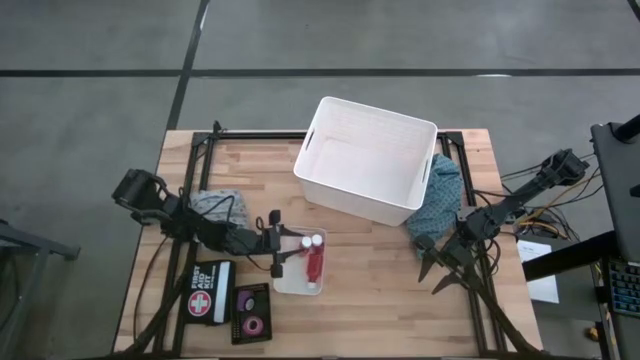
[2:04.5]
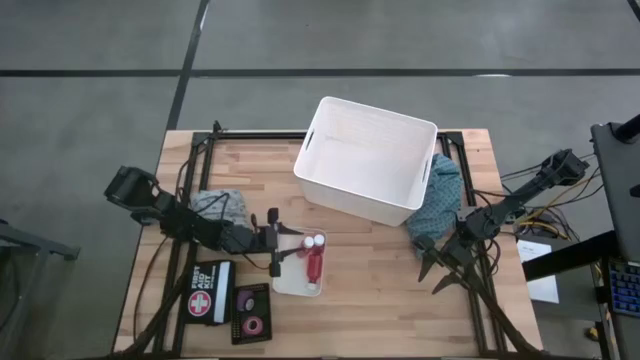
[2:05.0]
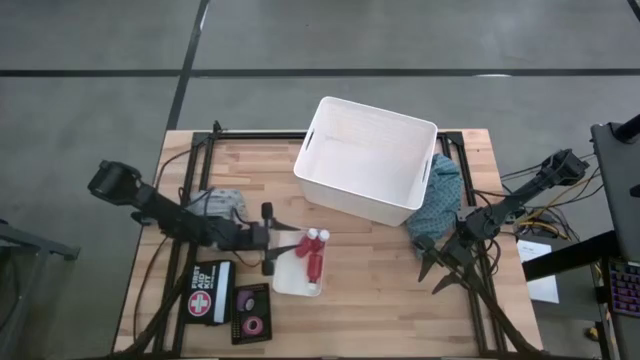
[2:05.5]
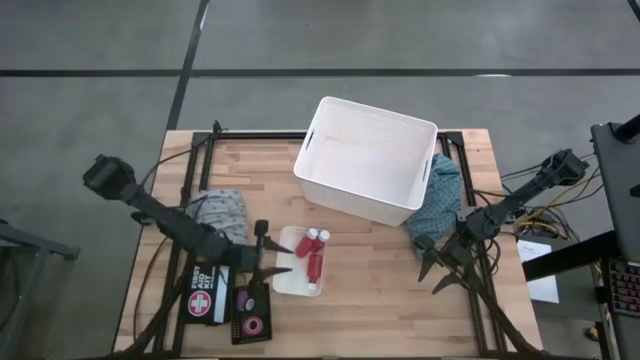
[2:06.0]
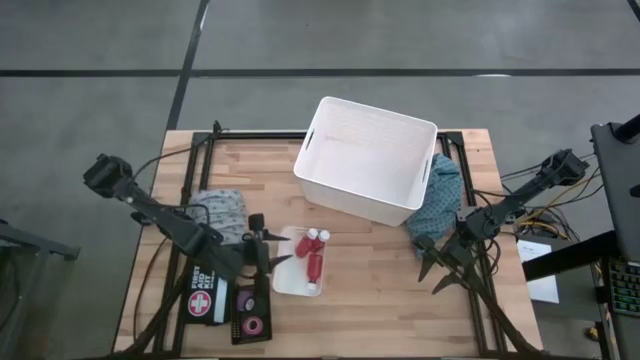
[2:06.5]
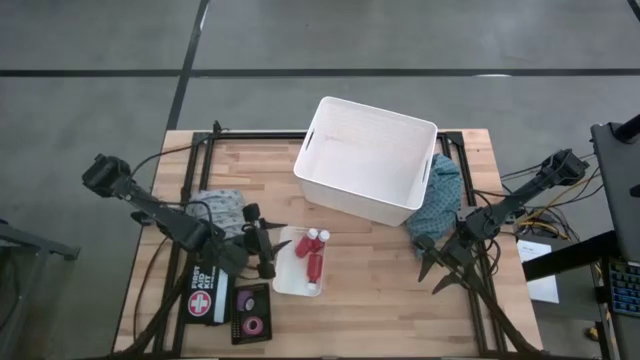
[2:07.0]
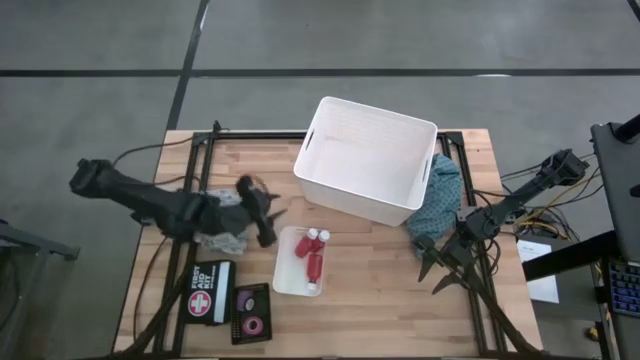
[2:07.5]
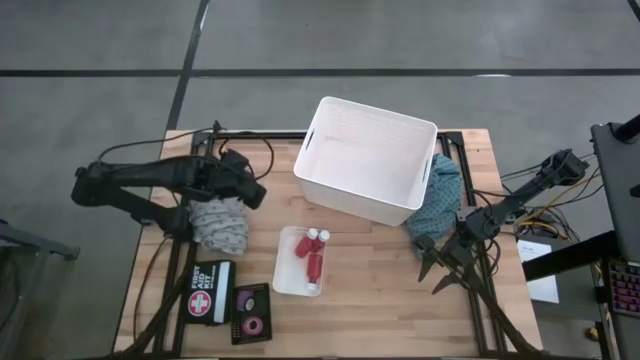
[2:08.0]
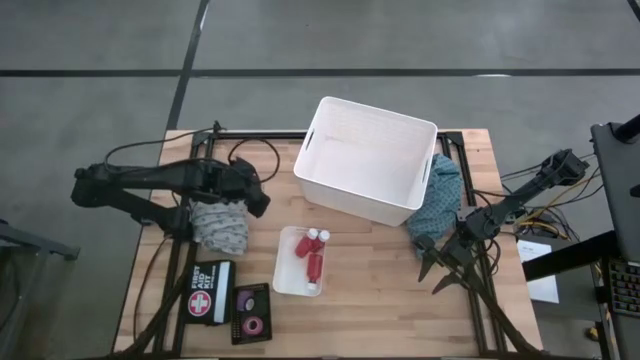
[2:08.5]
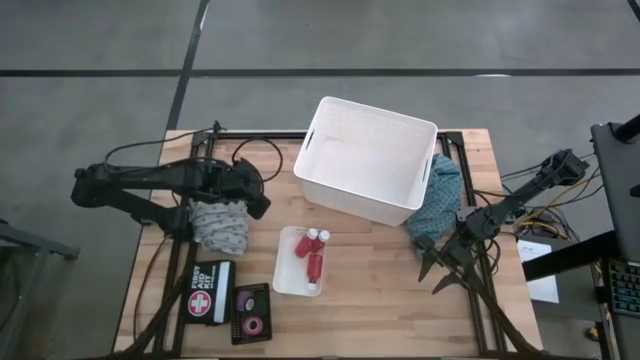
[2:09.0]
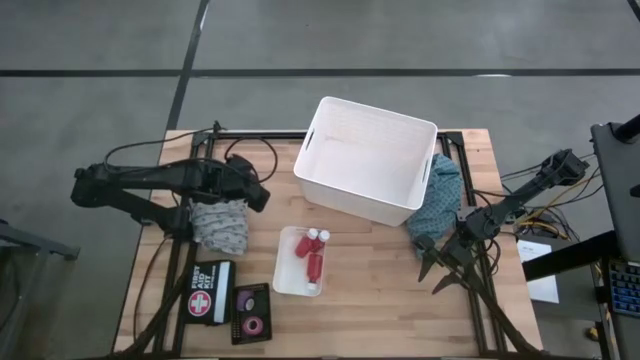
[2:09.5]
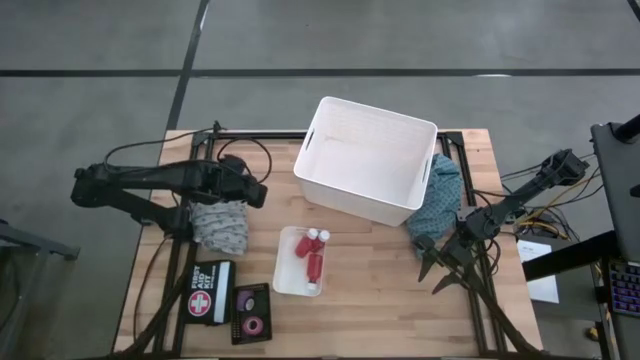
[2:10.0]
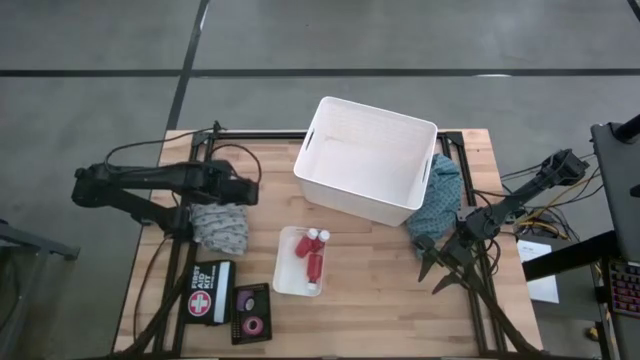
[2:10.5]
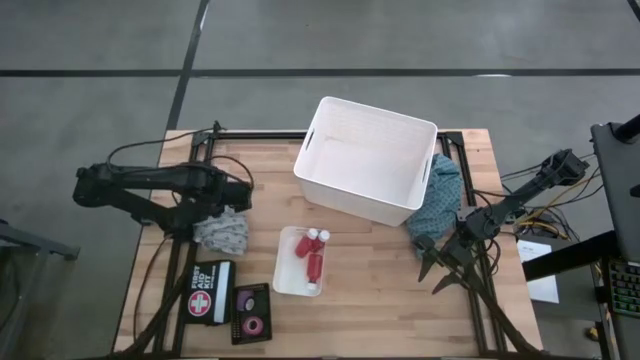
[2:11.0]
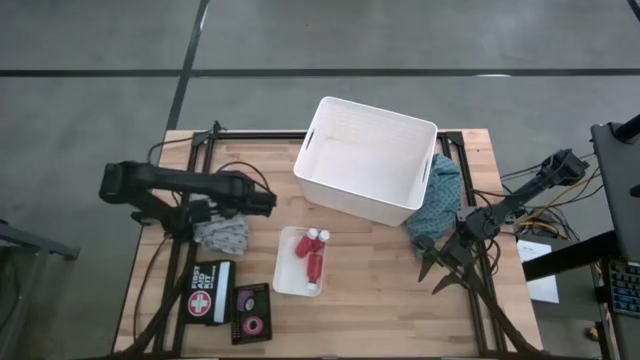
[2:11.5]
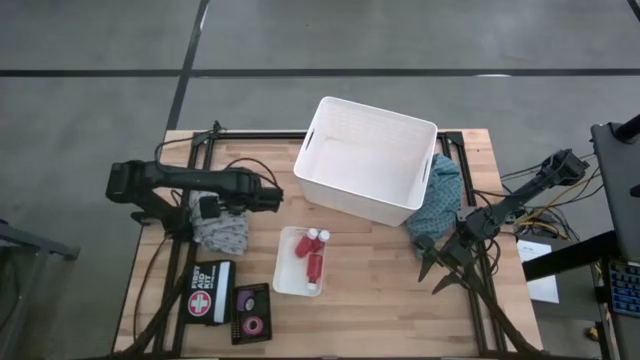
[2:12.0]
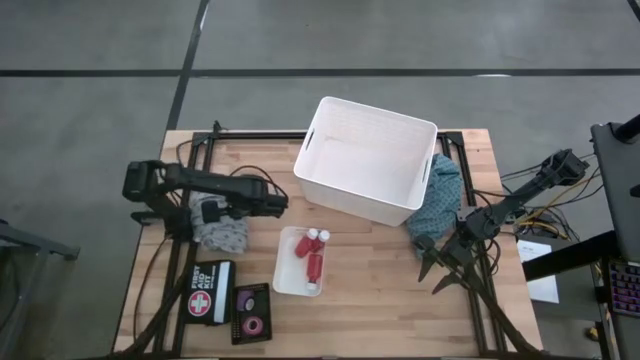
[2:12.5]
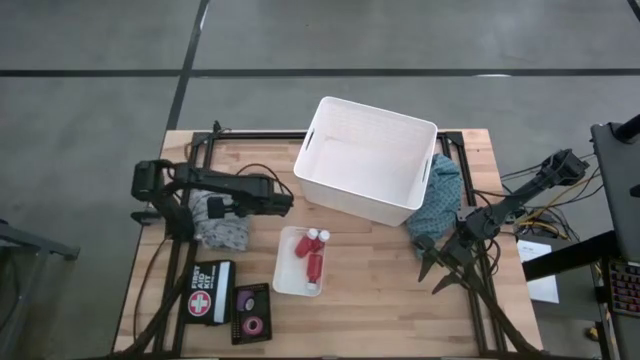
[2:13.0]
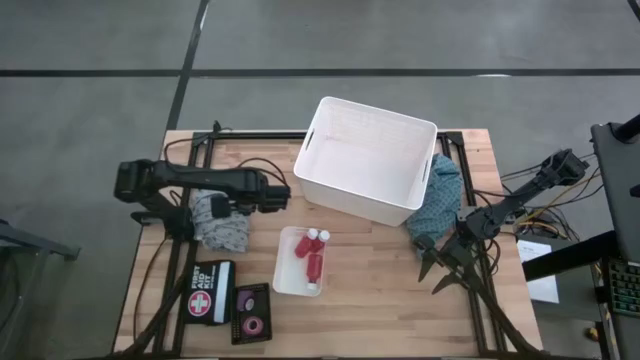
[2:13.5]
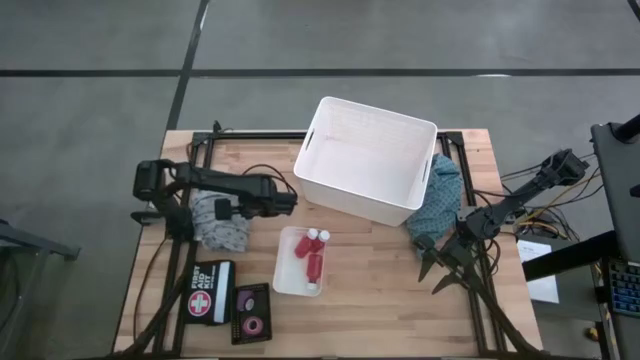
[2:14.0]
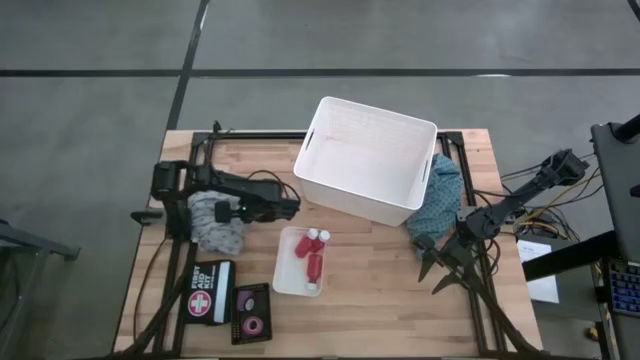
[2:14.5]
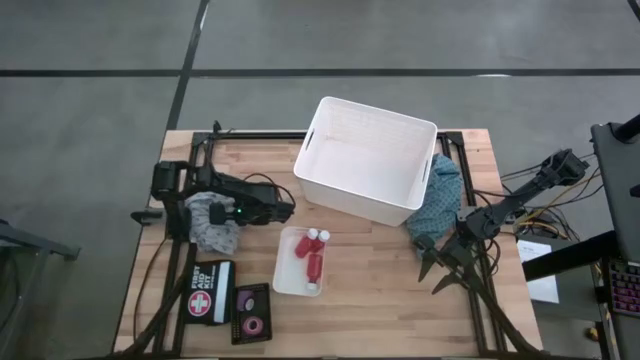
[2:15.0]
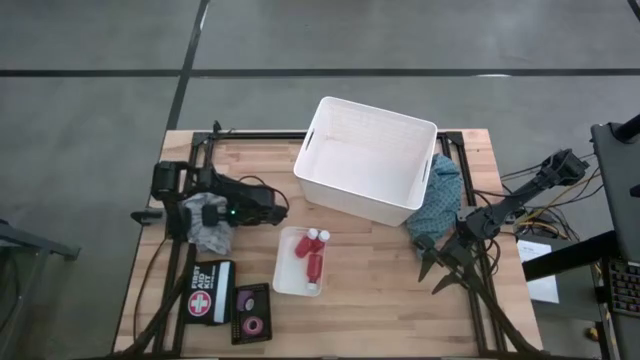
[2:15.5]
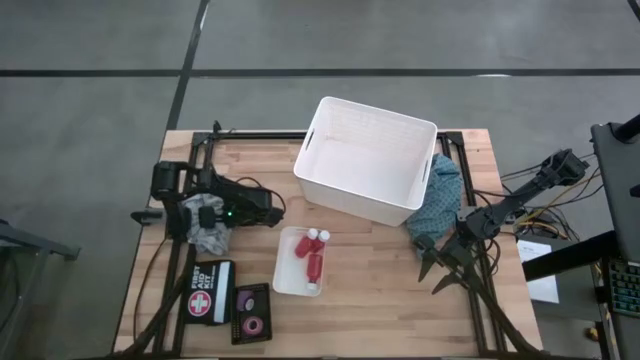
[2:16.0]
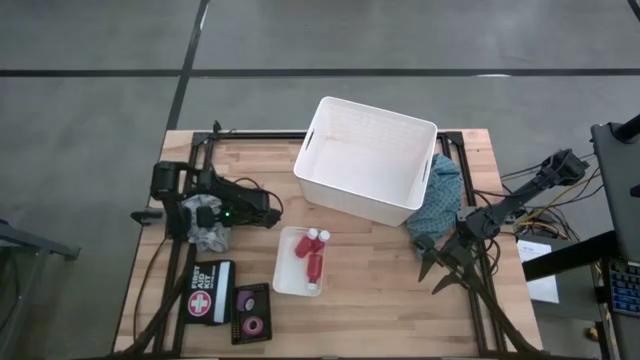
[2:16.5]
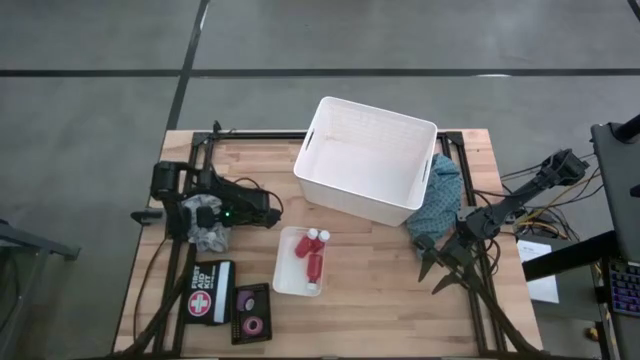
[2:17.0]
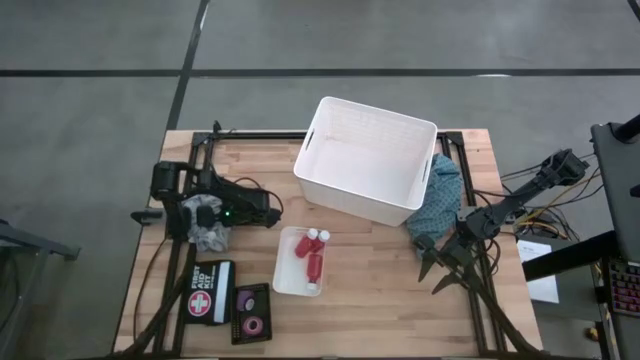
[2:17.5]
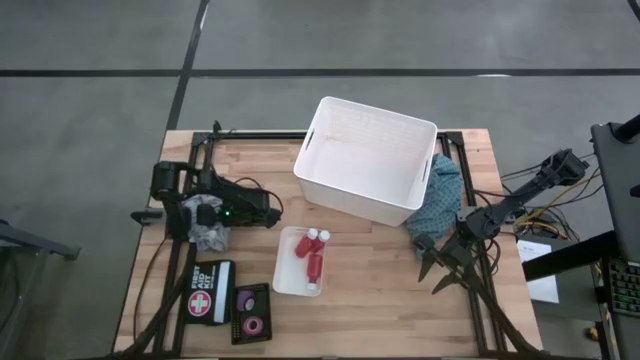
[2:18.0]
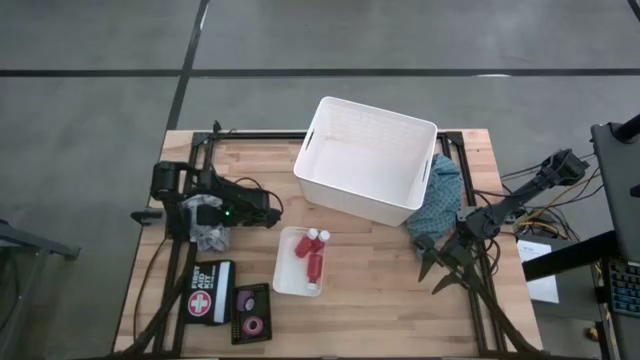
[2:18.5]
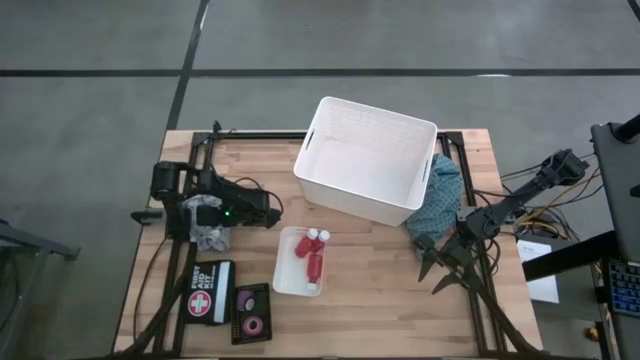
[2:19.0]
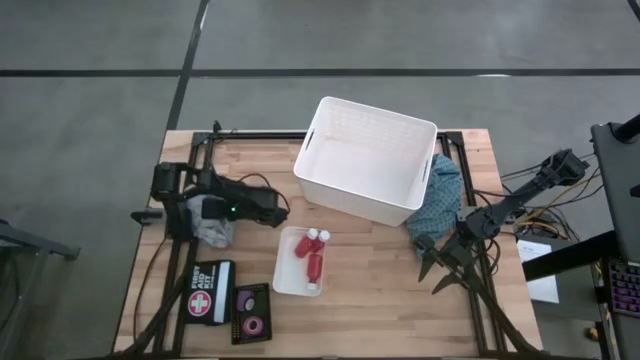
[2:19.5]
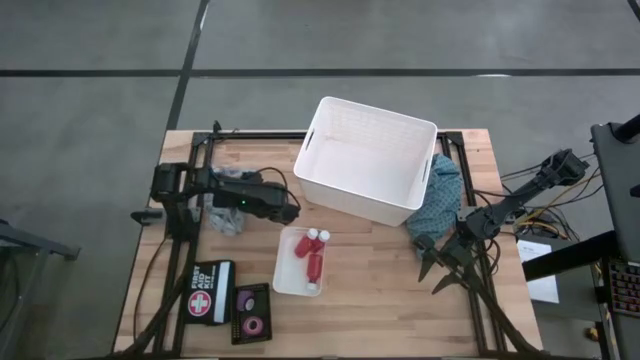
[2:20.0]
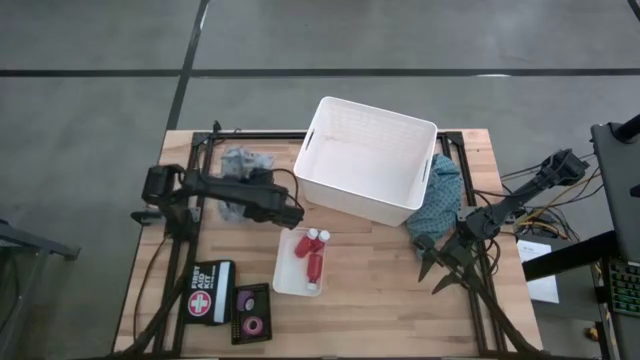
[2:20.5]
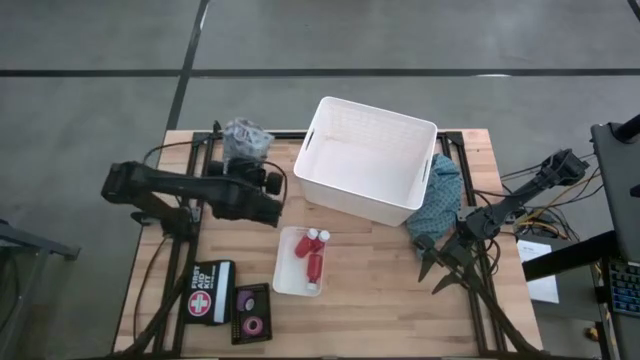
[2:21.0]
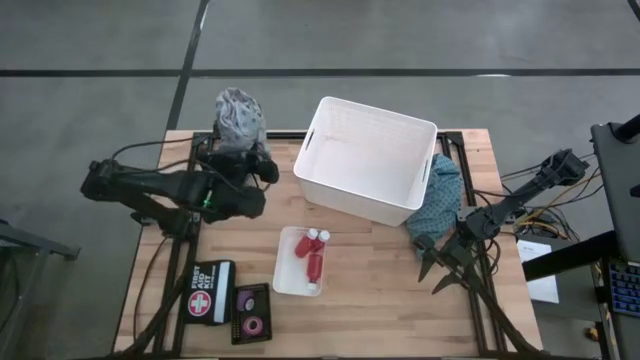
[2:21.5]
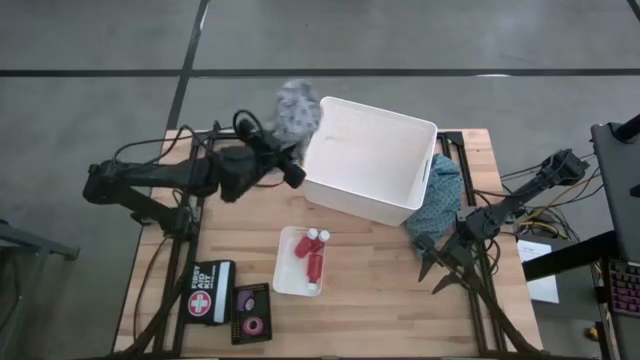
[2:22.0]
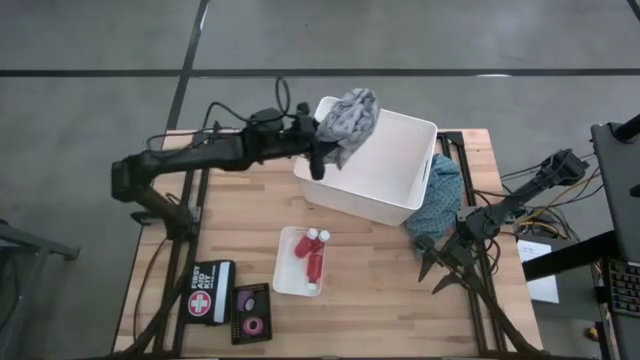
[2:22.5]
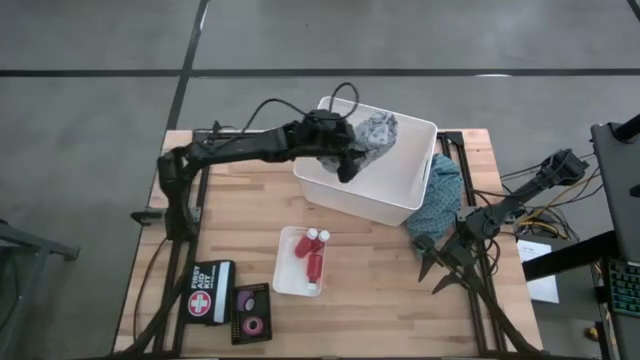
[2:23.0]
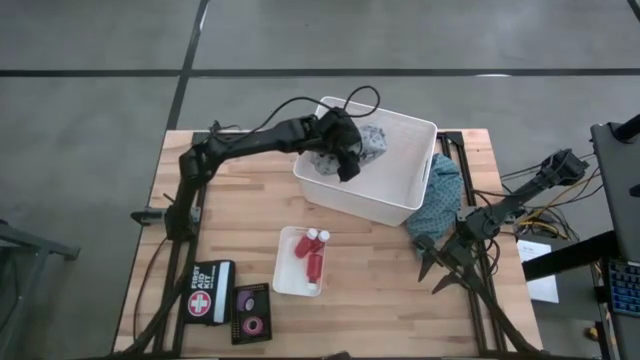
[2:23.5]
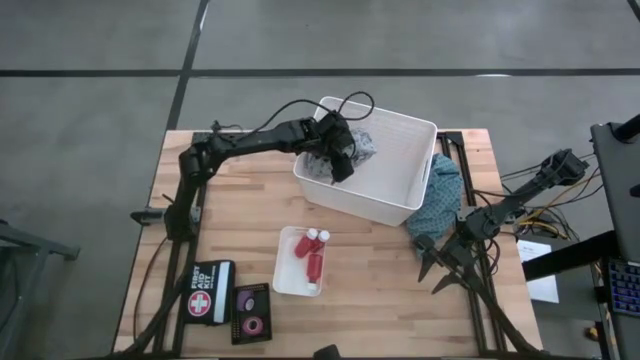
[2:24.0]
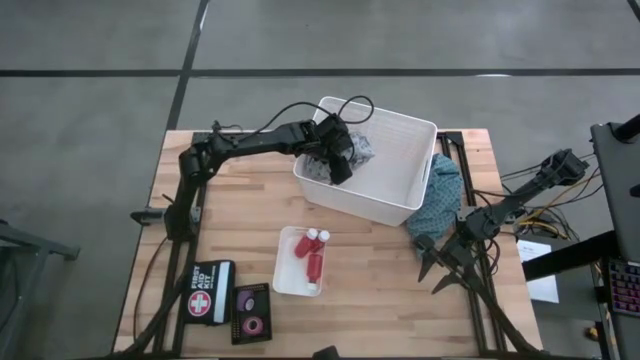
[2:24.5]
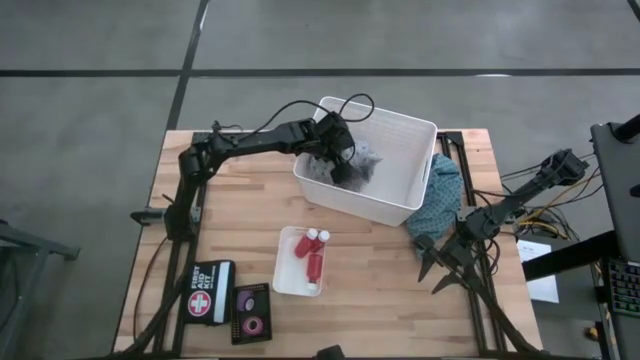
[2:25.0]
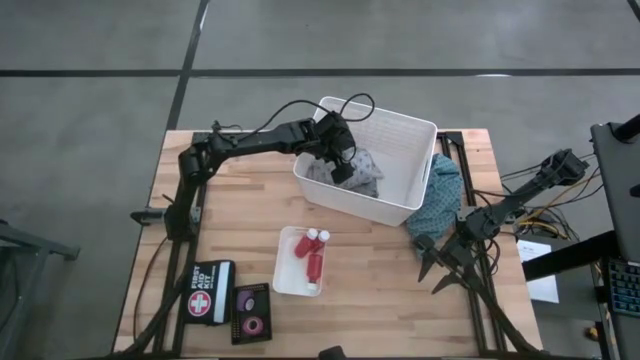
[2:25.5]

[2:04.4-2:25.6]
Task: Pick & Place Medicine items
Put the gray patient gown into the big white bin
